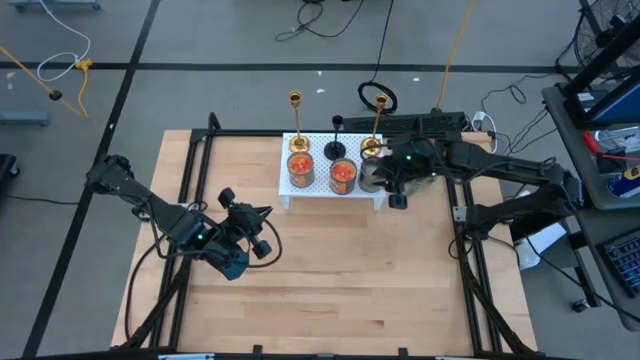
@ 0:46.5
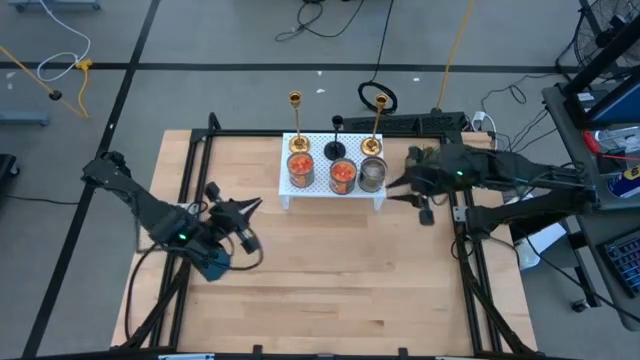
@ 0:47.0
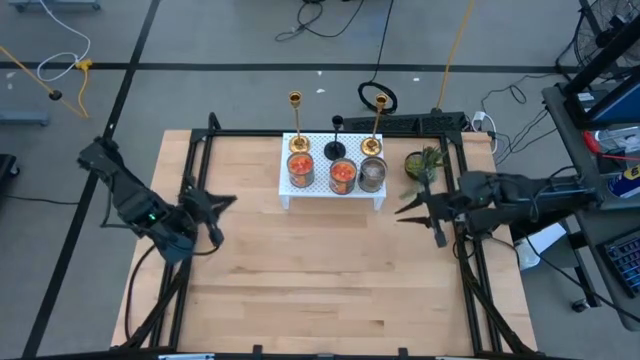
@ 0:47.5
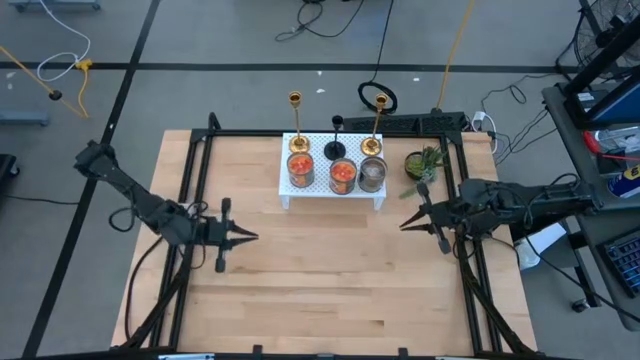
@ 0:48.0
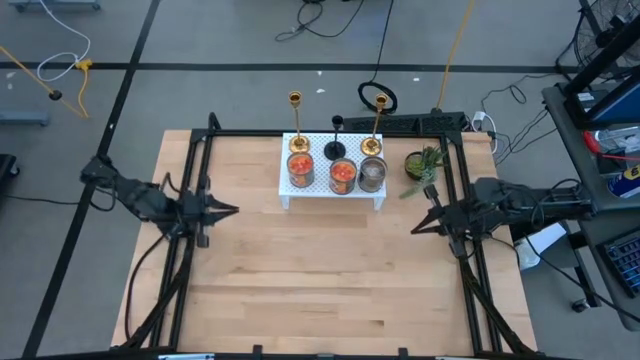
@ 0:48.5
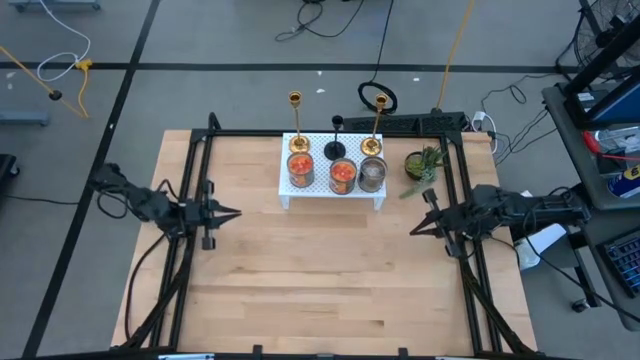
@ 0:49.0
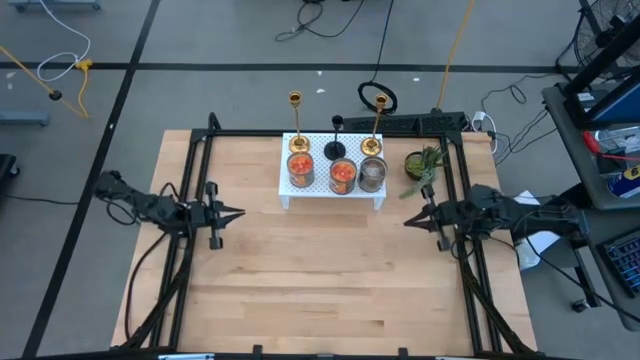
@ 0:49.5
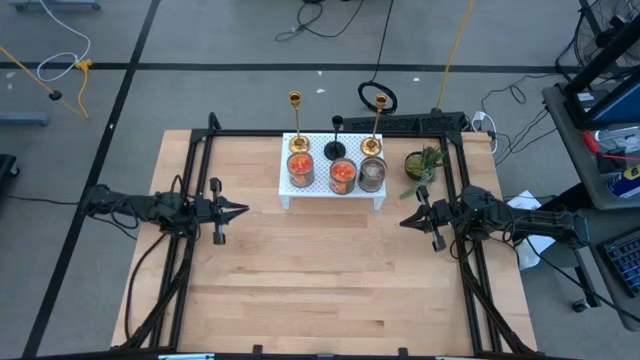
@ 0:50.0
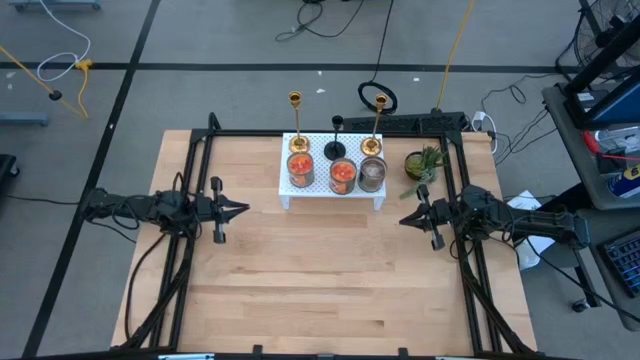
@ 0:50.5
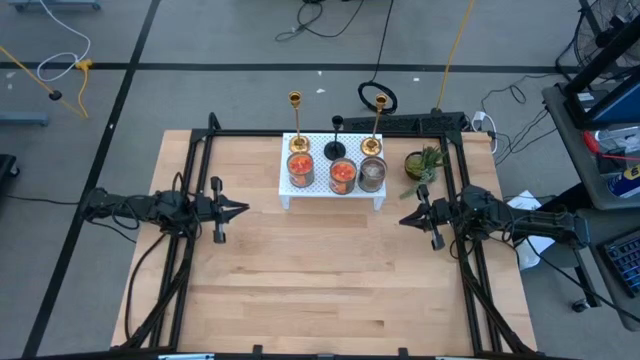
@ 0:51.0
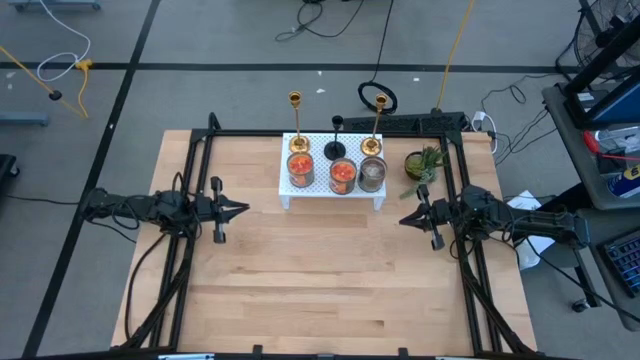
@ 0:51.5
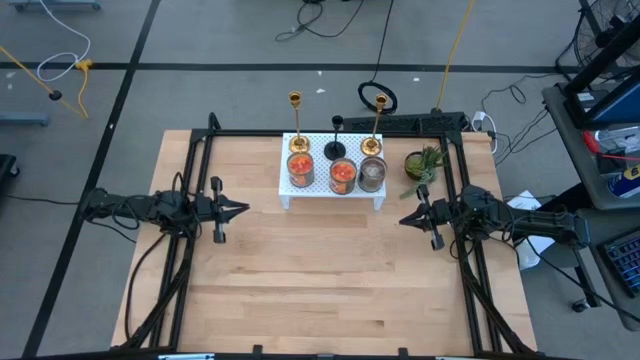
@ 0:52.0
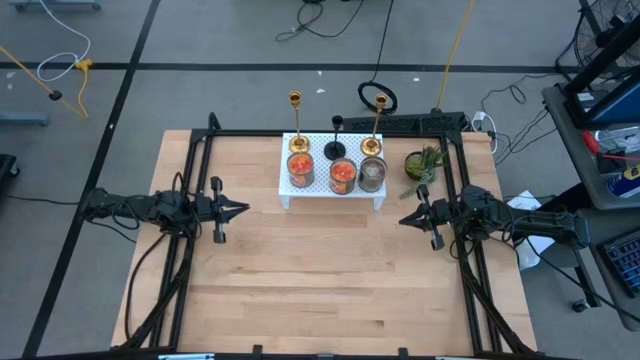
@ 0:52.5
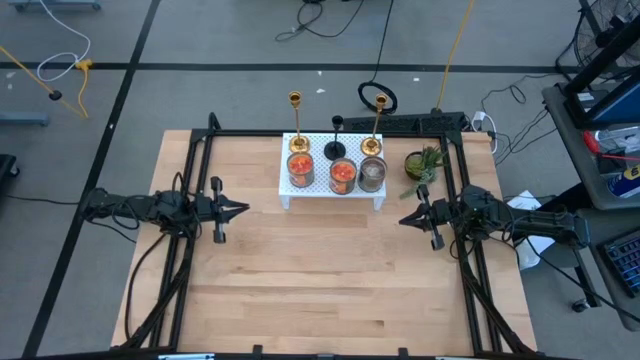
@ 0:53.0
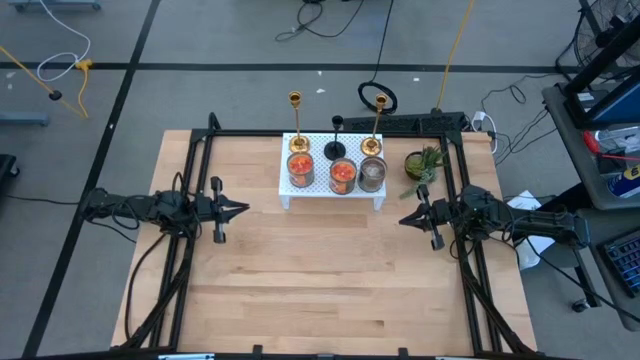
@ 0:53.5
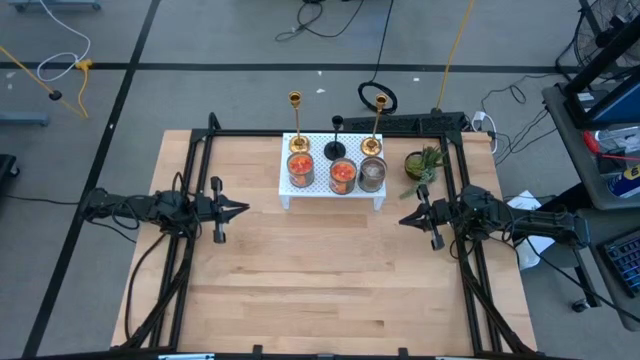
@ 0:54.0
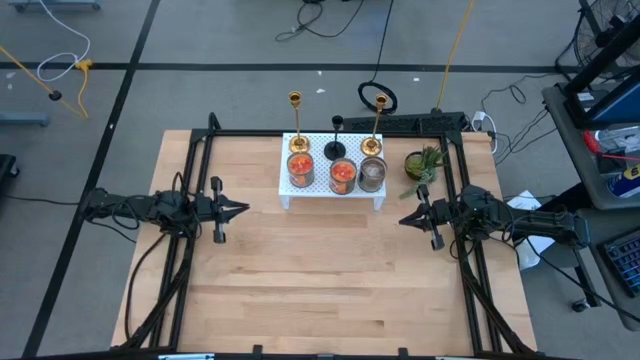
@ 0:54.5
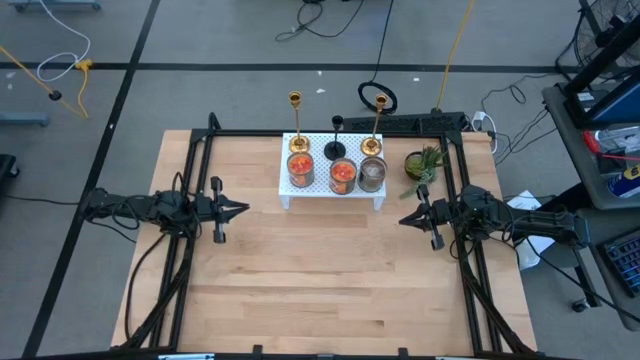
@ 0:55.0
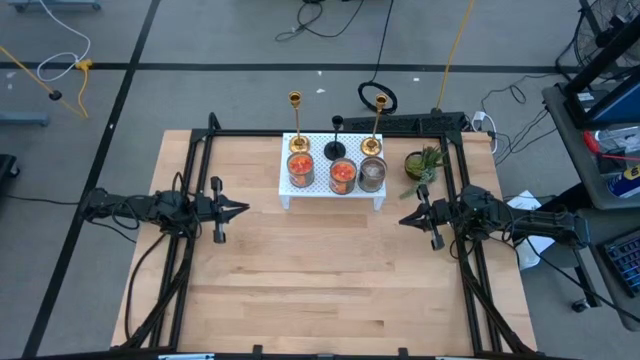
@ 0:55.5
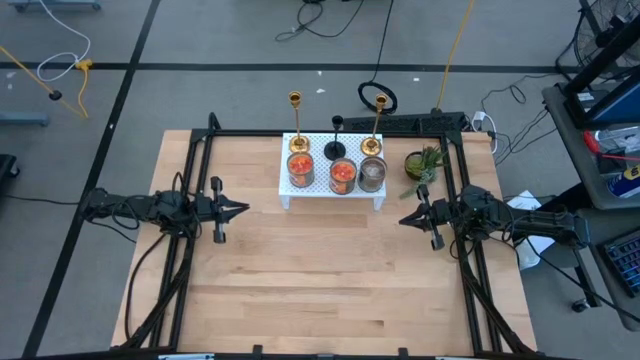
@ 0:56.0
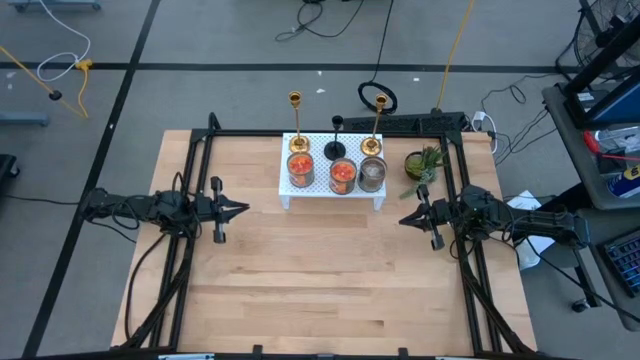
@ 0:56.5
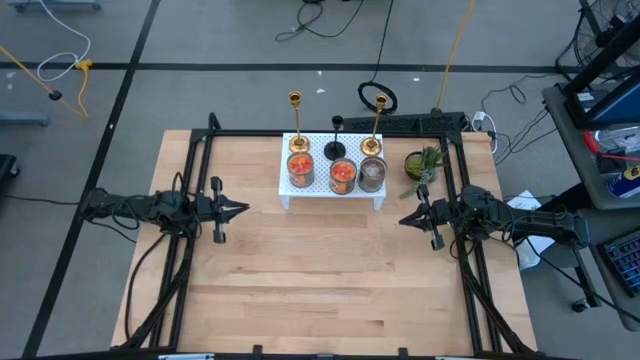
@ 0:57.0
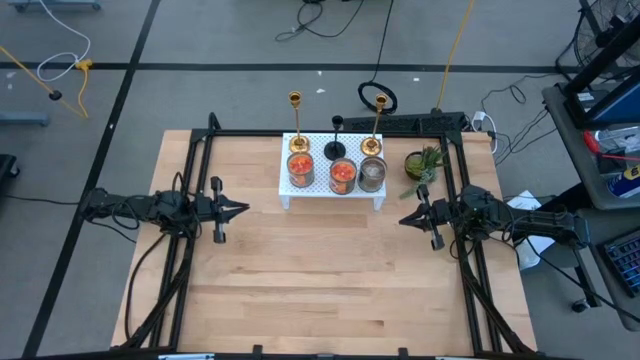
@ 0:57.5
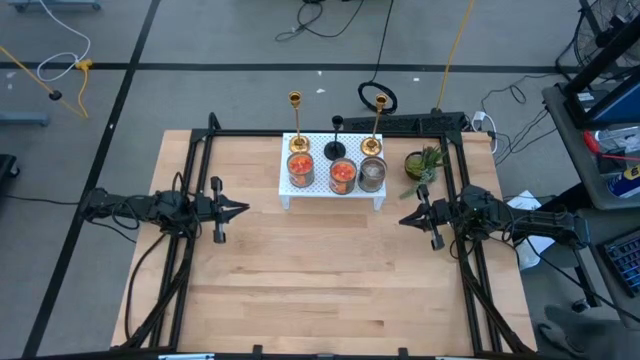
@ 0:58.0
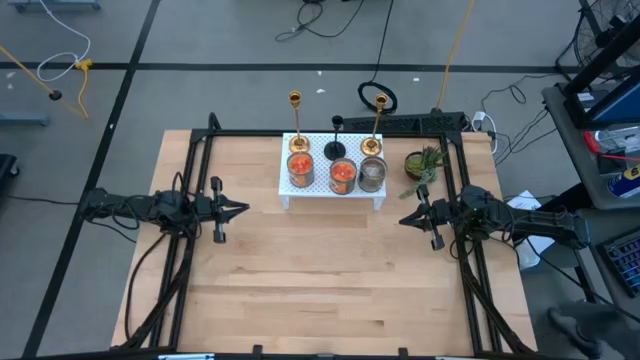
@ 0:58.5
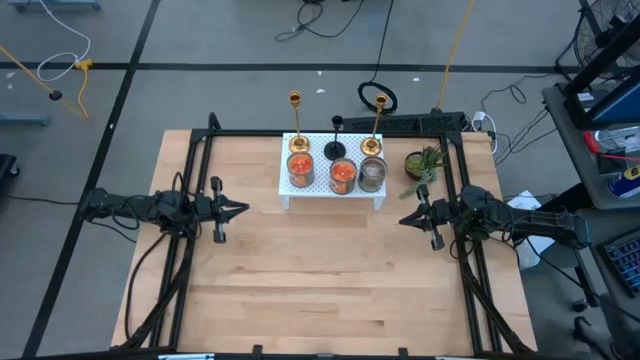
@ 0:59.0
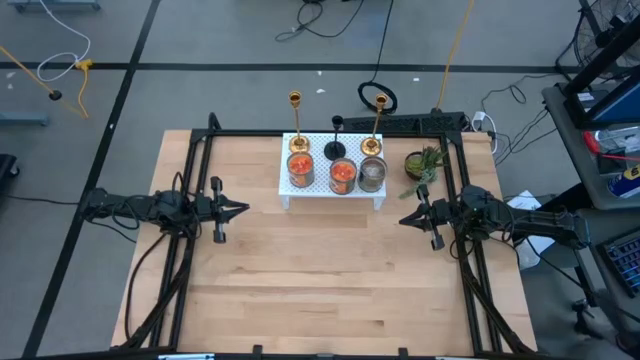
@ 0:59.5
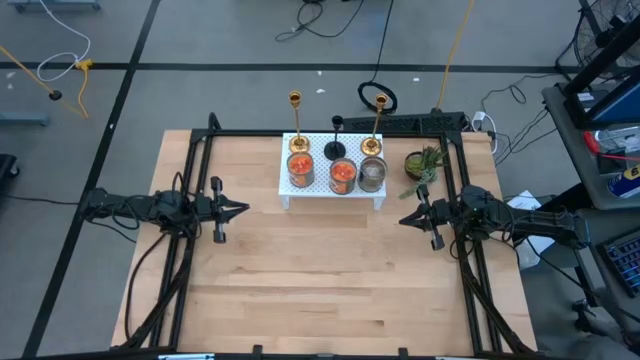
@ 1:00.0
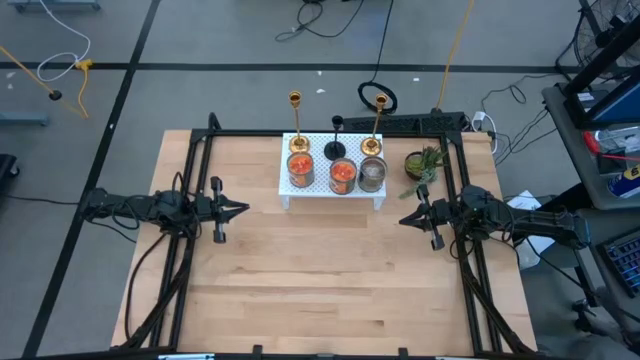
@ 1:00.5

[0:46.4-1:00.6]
Task: Pick & Place candle stick holders
Return to Home Position

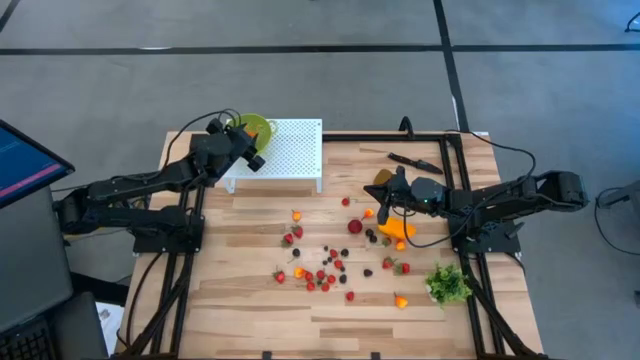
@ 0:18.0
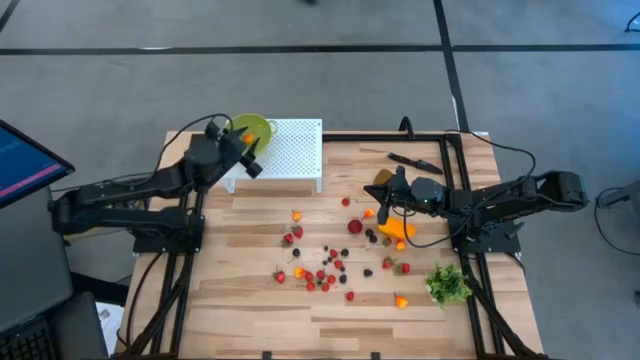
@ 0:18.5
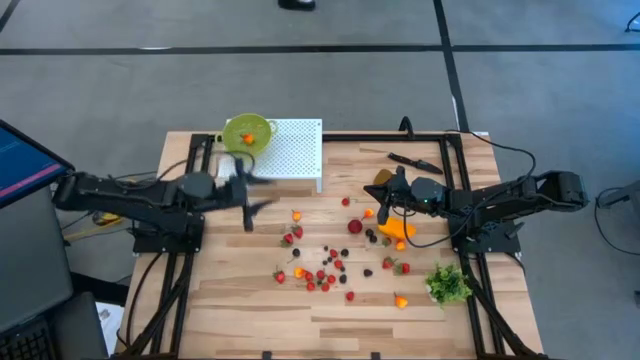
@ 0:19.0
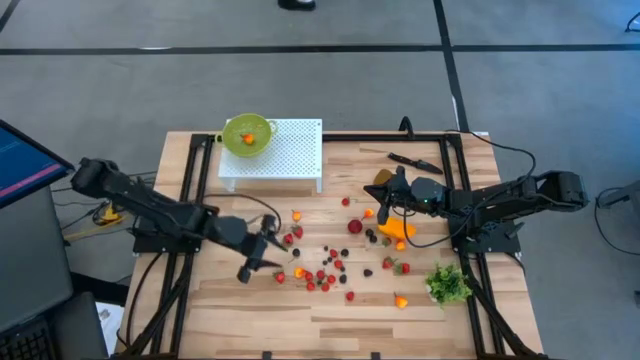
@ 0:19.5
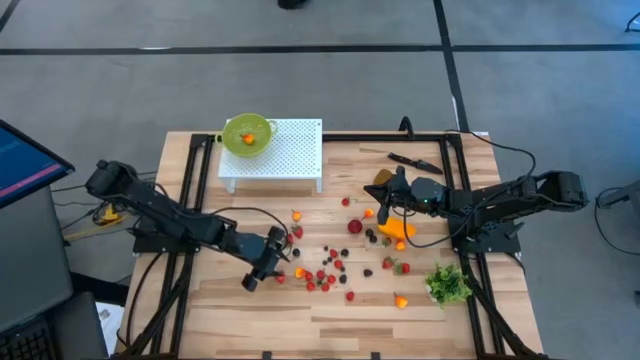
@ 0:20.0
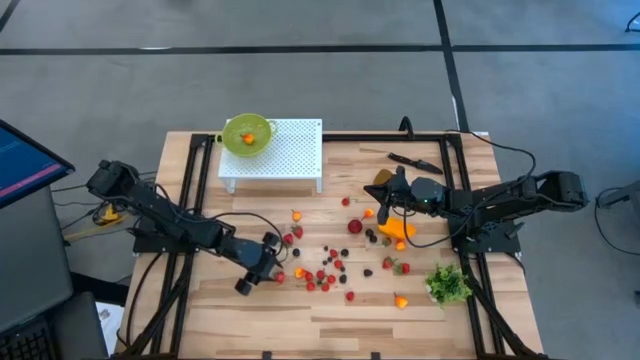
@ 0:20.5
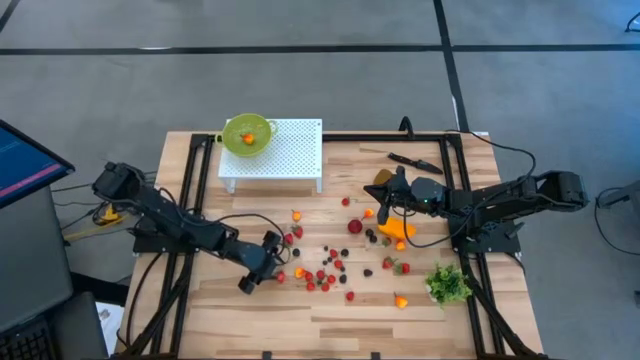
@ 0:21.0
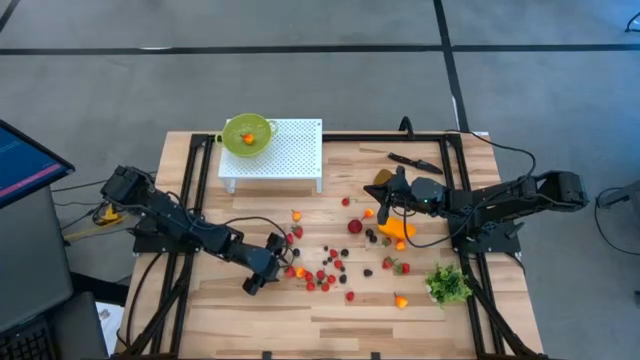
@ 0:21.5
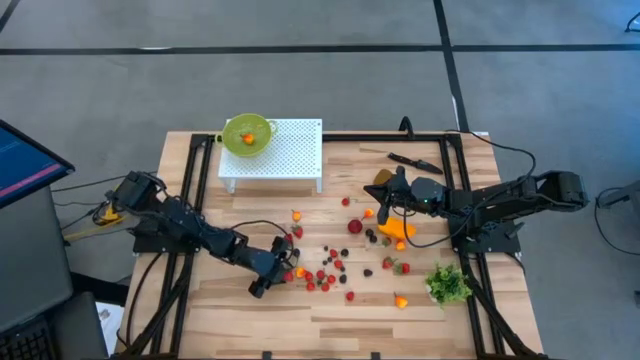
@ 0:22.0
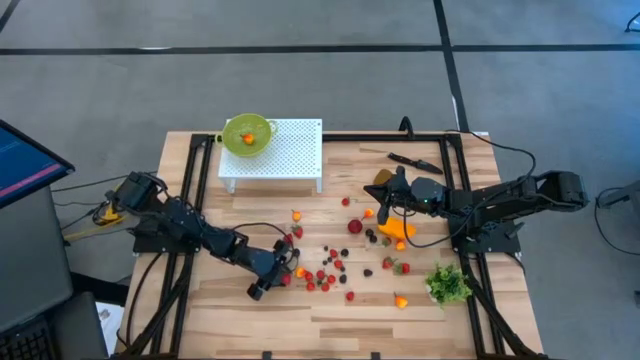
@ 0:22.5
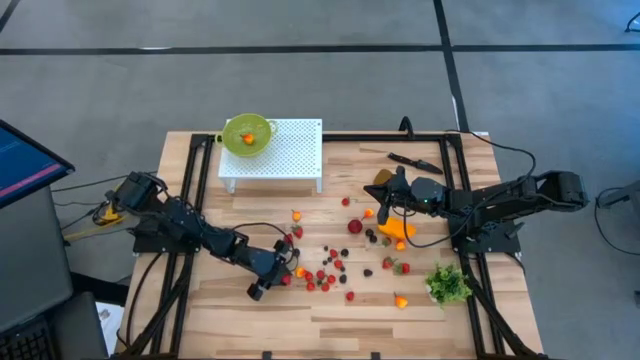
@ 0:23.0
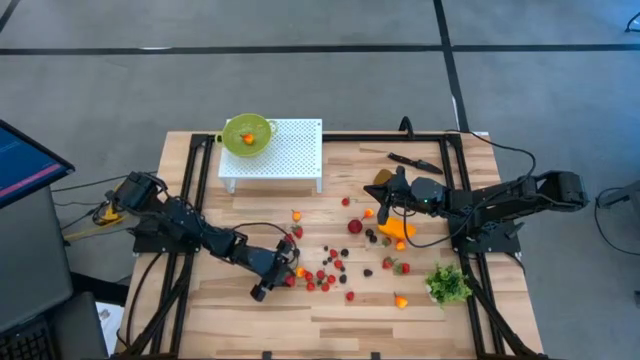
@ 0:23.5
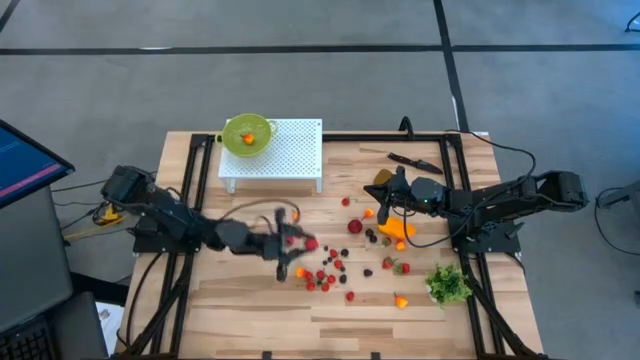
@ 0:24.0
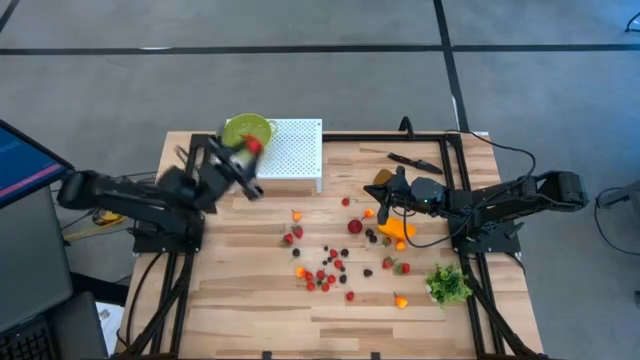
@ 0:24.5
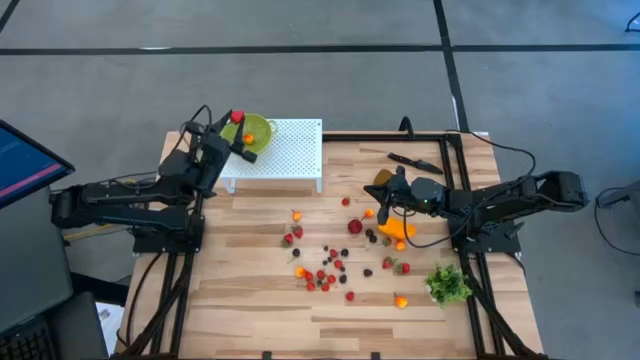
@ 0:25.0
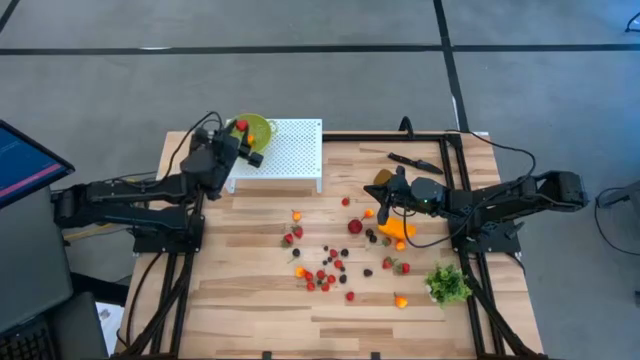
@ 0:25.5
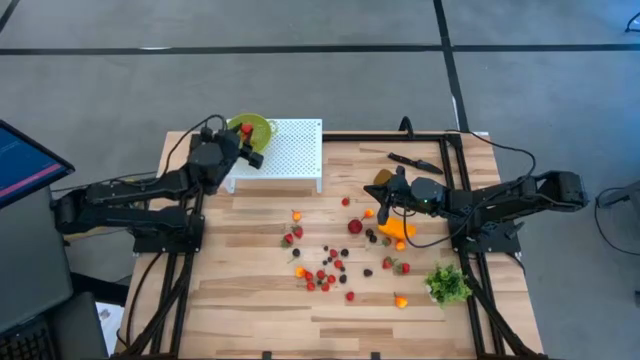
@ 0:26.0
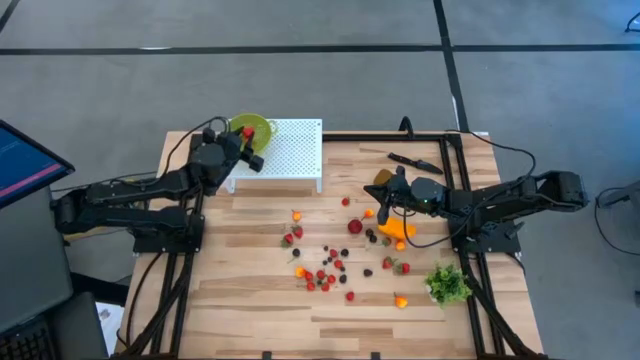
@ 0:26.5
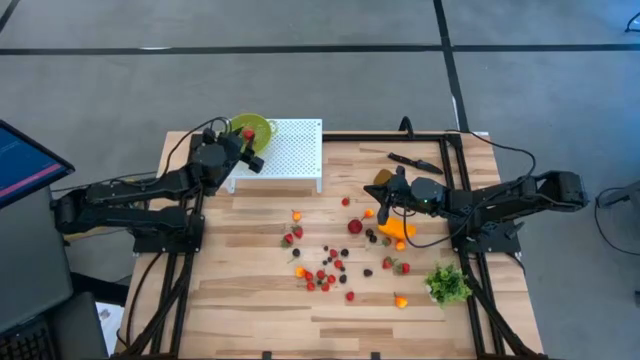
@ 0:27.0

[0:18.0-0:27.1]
Task: Pick & Place Fruit
Put the strawberry into the green strainer bowl
